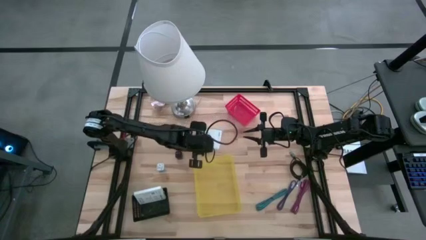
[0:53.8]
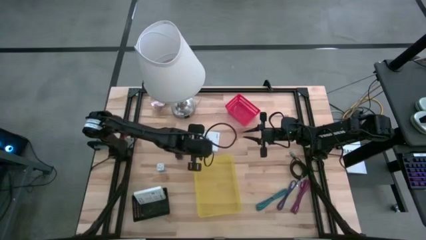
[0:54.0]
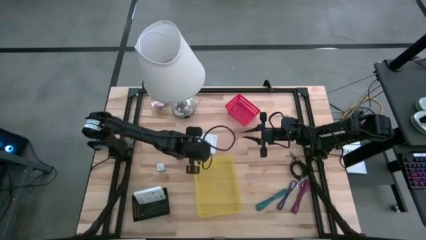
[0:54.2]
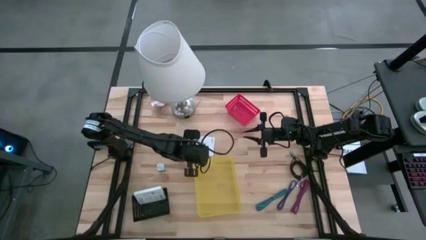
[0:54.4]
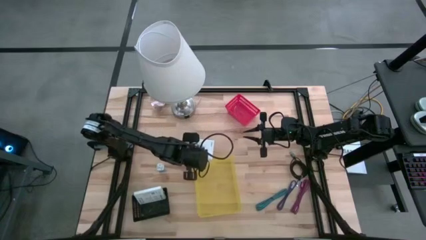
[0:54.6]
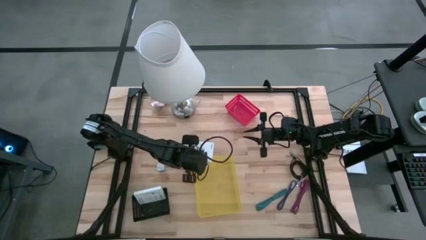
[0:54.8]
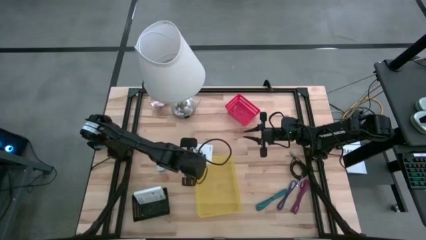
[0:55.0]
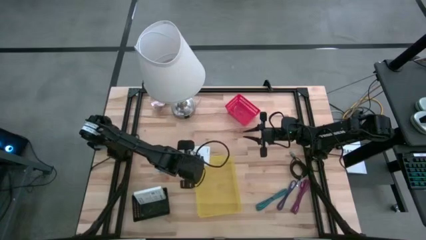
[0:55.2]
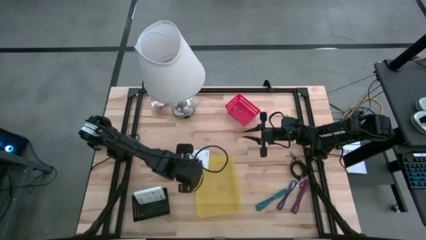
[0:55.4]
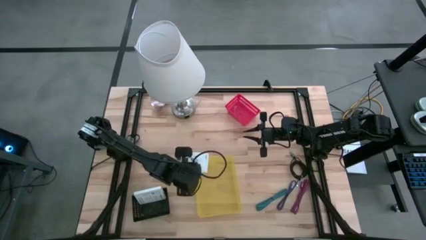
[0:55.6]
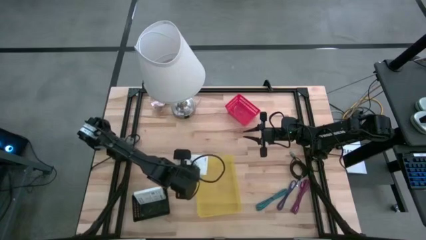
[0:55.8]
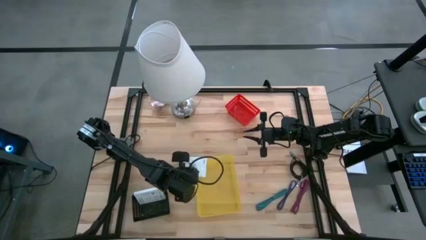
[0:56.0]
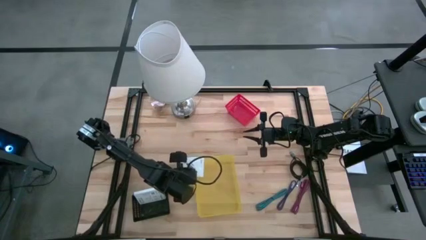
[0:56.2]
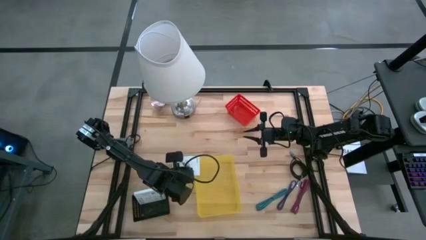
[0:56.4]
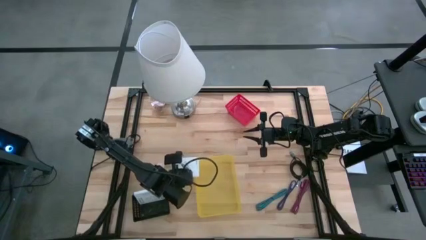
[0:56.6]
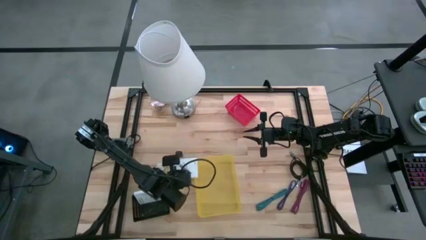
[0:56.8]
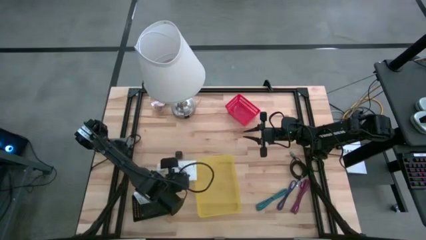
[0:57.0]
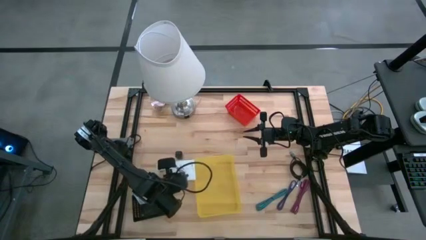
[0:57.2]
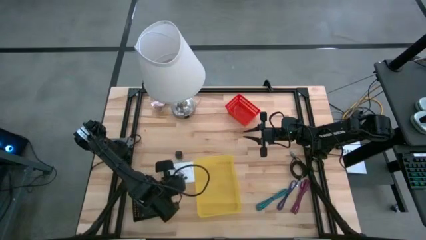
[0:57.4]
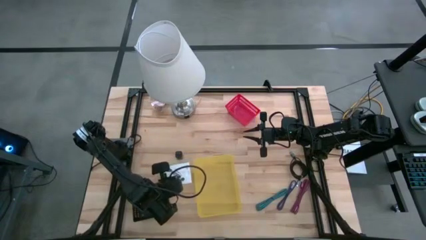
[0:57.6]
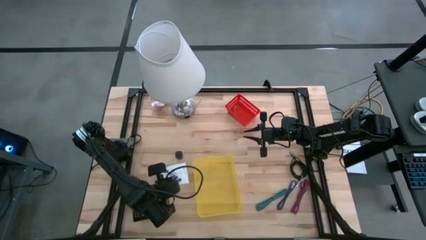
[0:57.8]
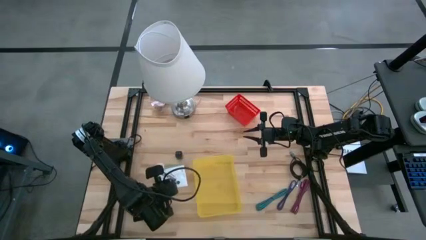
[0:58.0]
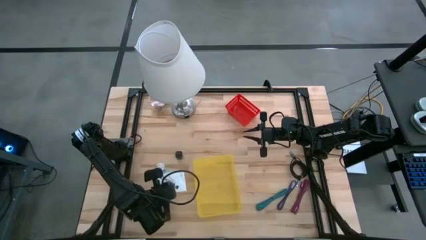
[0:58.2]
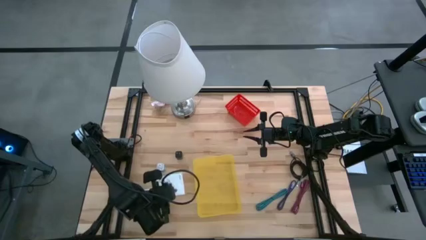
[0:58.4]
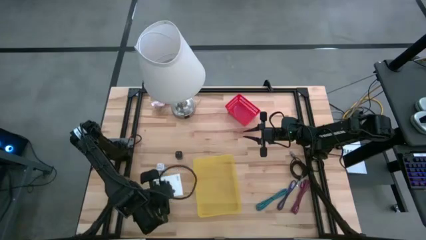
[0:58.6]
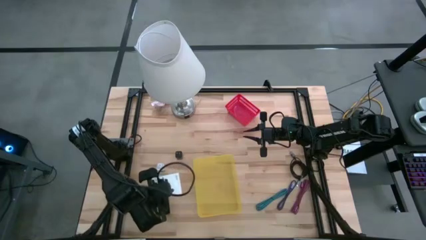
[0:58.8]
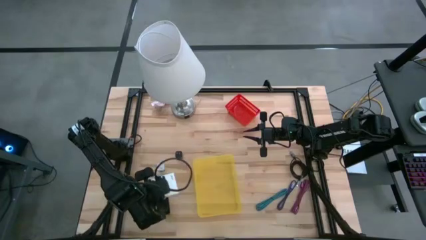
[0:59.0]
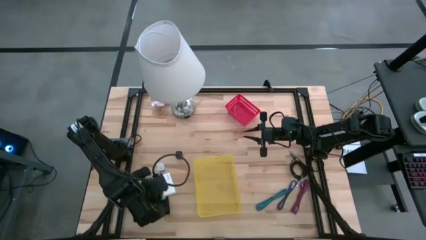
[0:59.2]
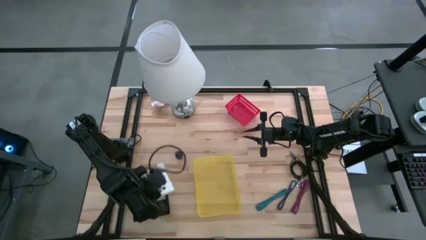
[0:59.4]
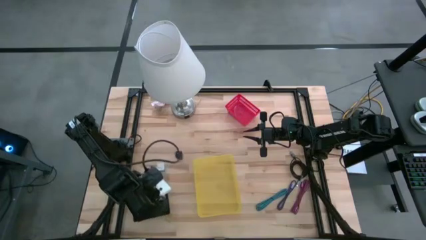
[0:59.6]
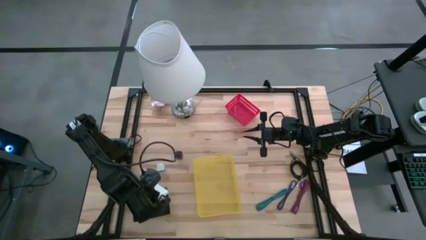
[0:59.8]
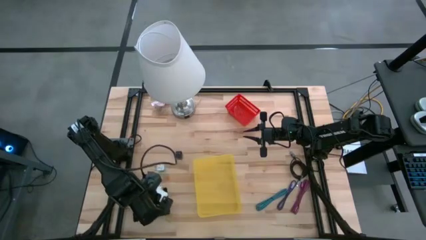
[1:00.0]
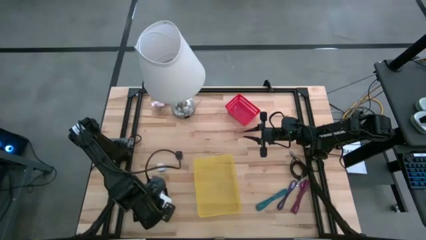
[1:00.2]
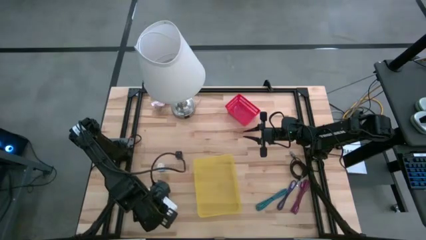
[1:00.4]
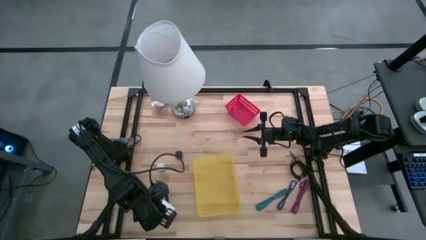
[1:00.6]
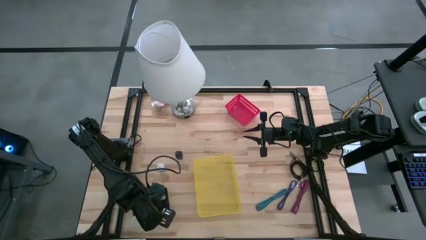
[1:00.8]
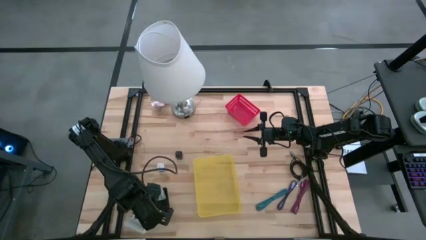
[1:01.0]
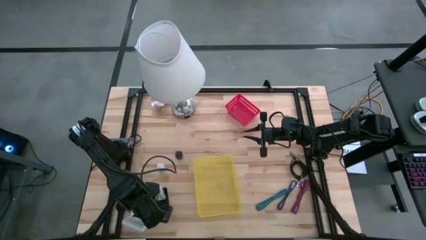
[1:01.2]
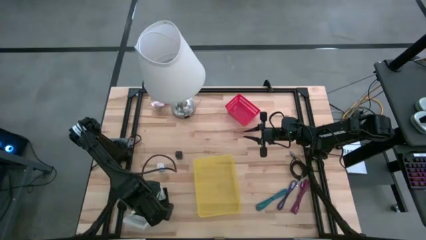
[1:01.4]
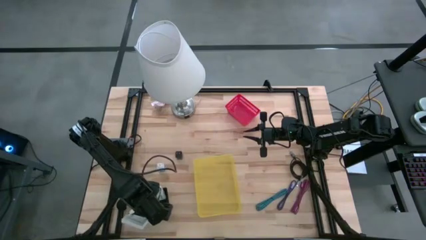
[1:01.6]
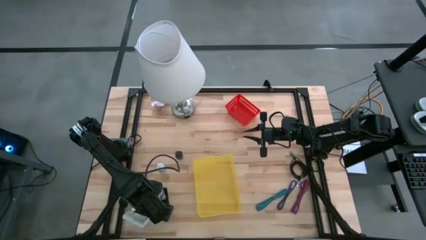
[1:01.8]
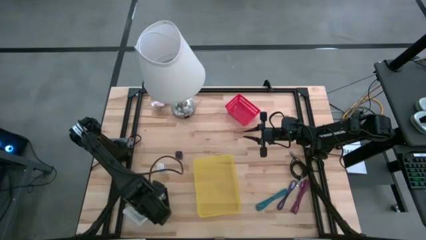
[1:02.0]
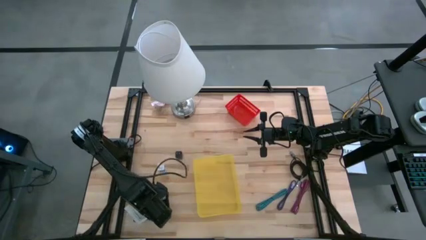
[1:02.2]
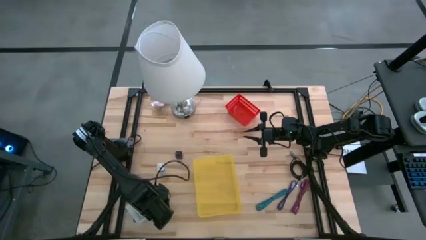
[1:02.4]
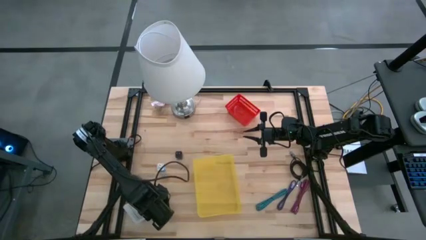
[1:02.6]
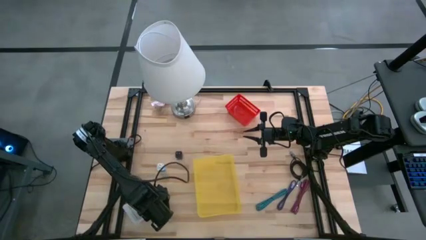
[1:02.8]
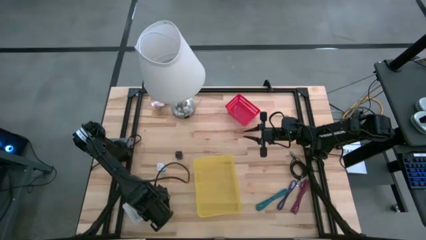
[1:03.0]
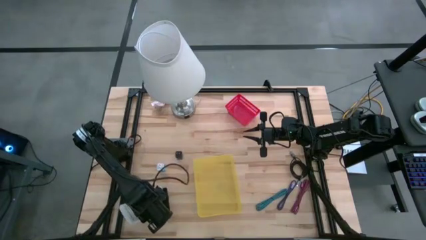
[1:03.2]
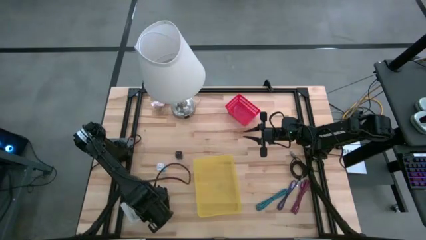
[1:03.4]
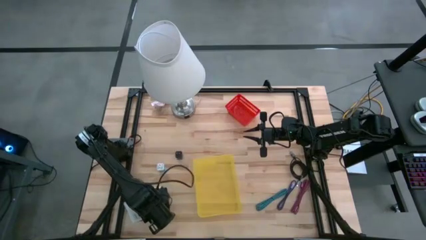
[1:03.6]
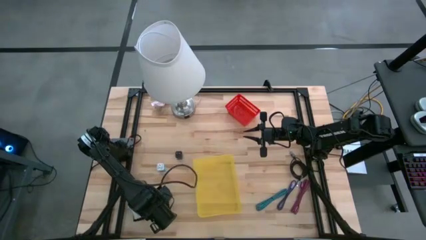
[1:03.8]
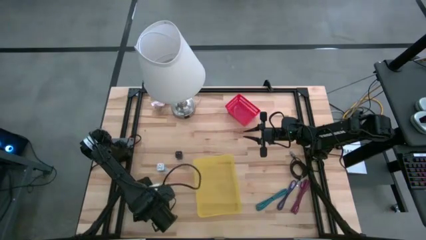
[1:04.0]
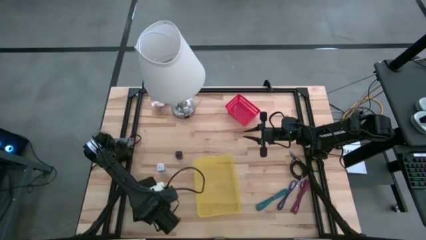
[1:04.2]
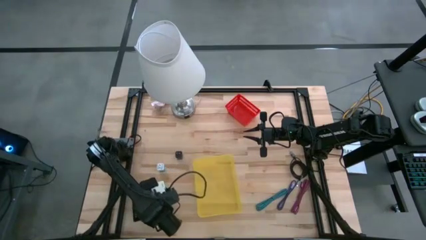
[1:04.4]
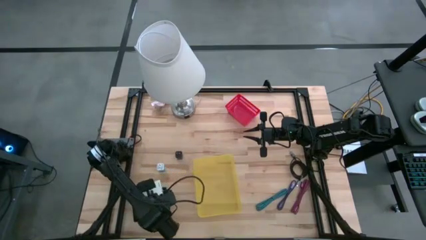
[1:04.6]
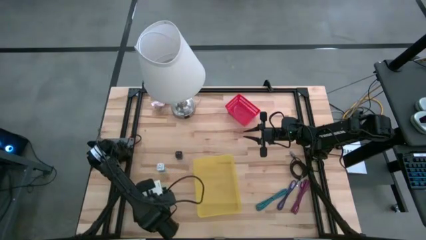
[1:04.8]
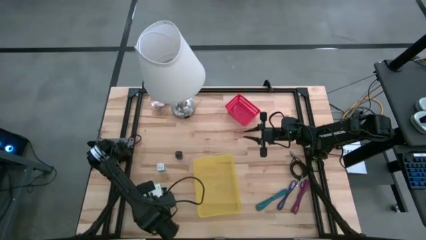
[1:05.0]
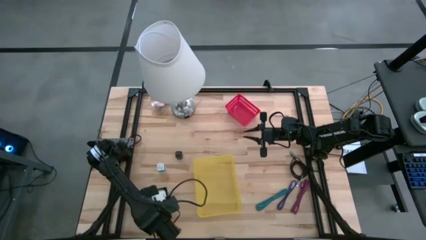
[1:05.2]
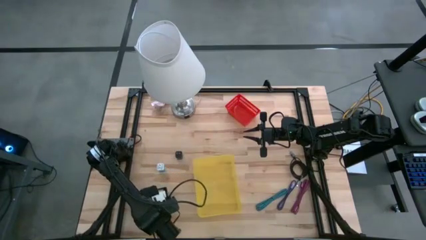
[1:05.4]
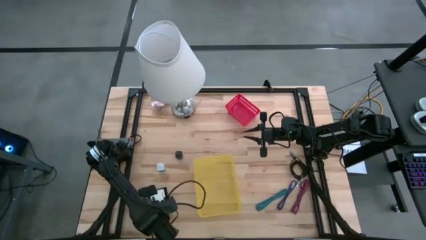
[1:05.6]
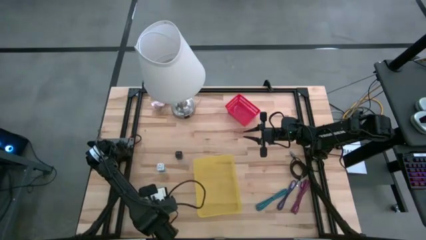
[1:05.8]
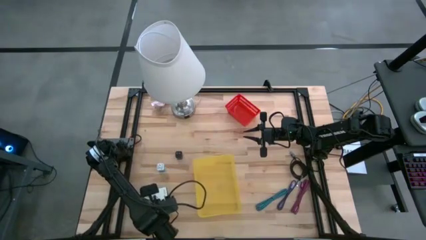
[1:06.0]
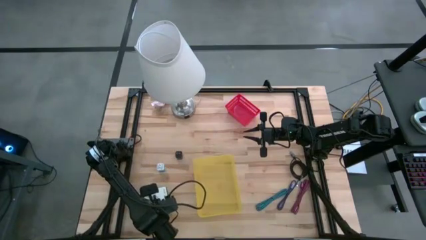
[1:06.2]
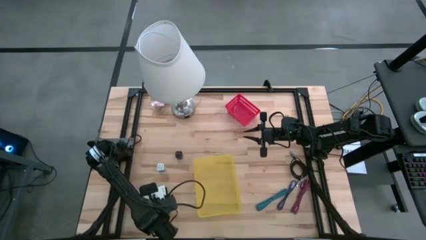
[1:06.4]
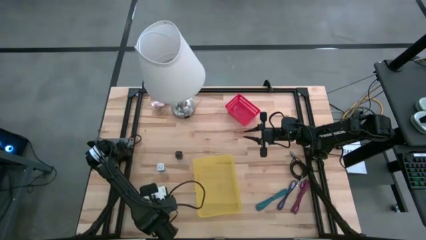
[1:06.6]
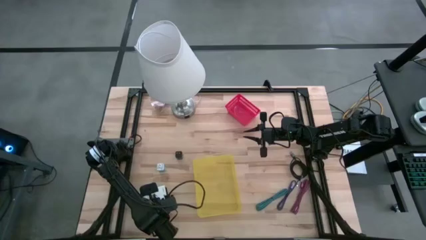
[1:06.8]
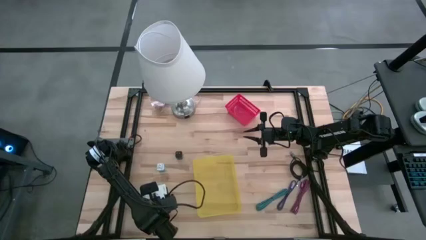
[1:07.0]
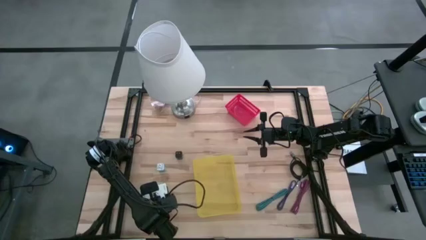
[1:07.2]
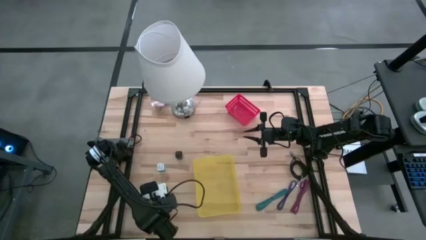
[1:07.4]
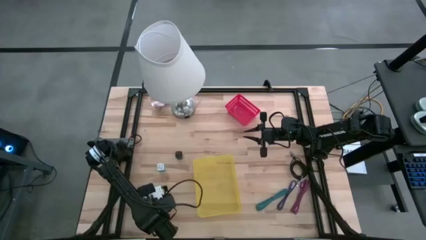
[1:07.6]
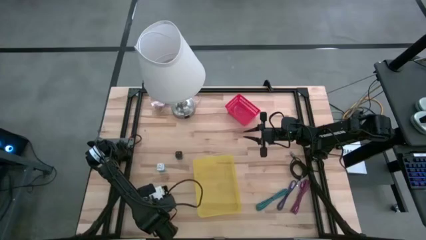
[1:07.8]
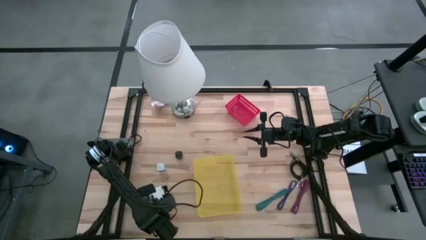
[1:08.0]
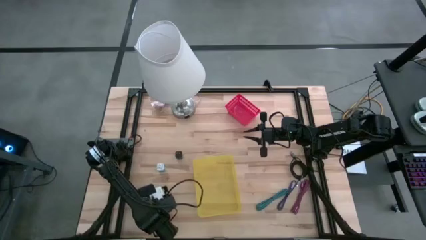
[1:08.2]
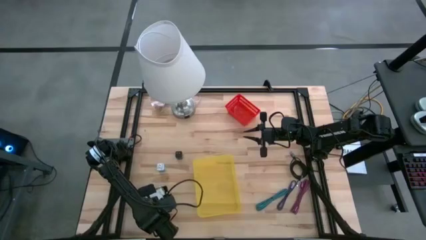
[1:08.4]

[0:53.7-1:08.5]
Task: Pick and place items into bin
Put the card reader box into the black bin
